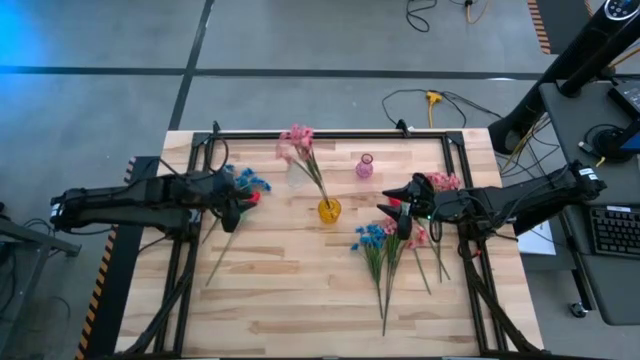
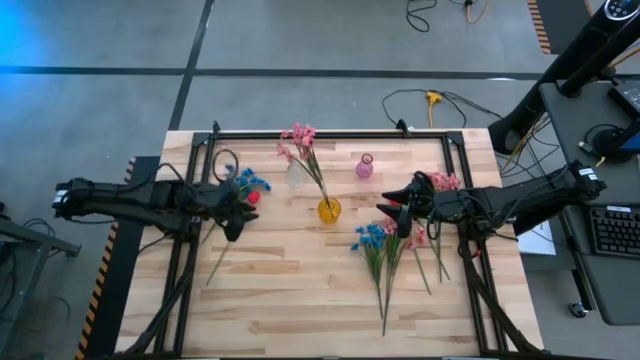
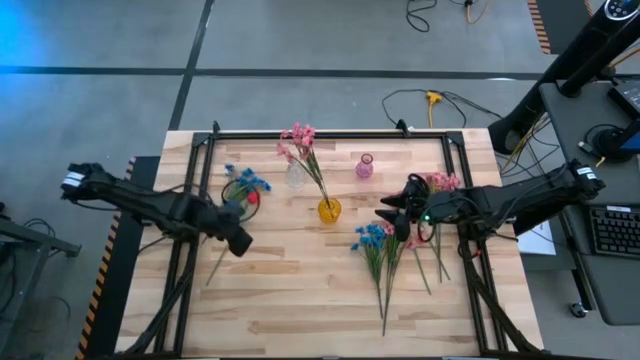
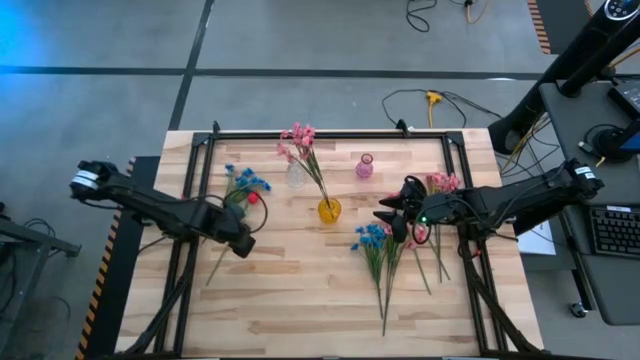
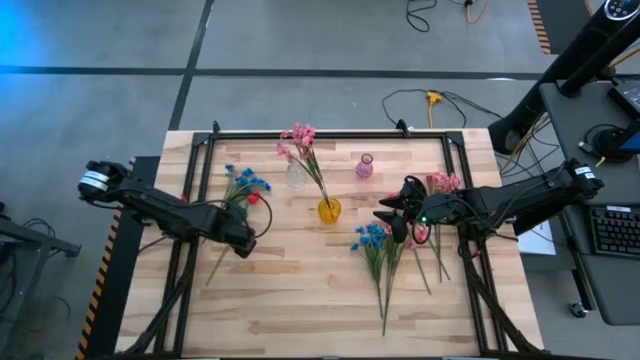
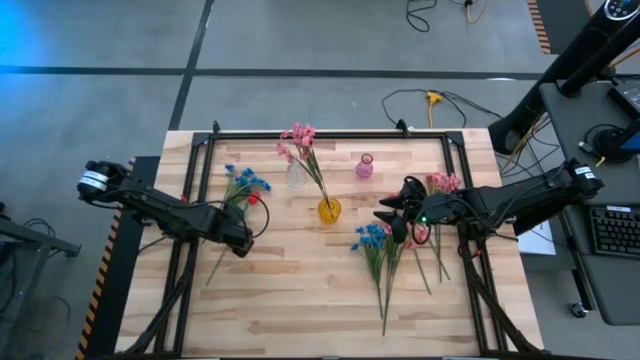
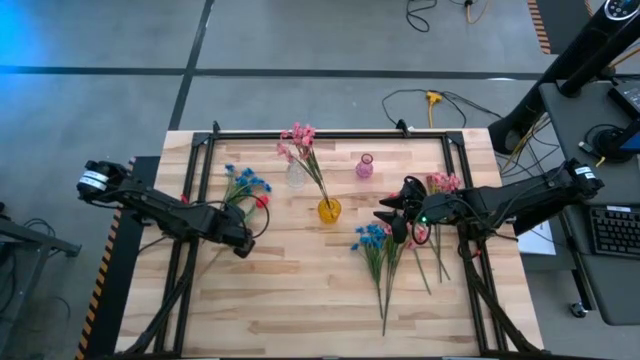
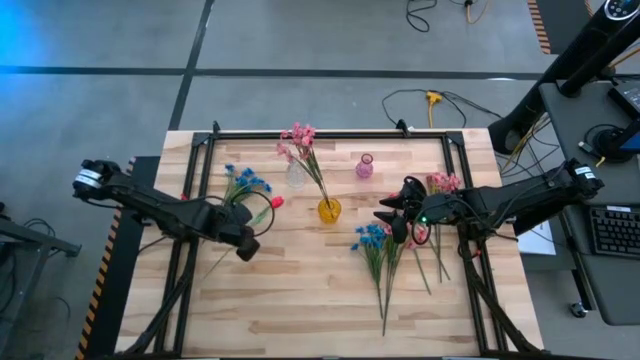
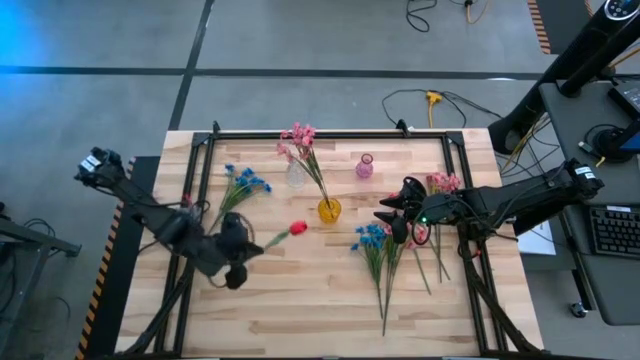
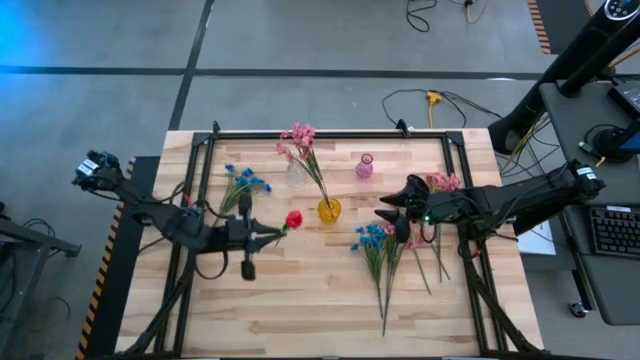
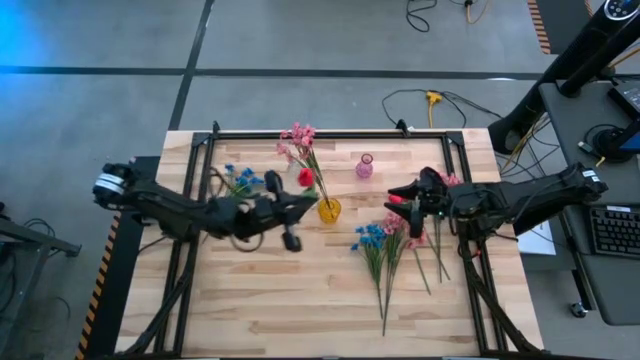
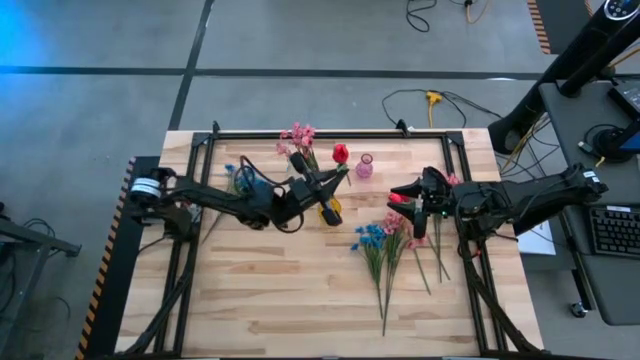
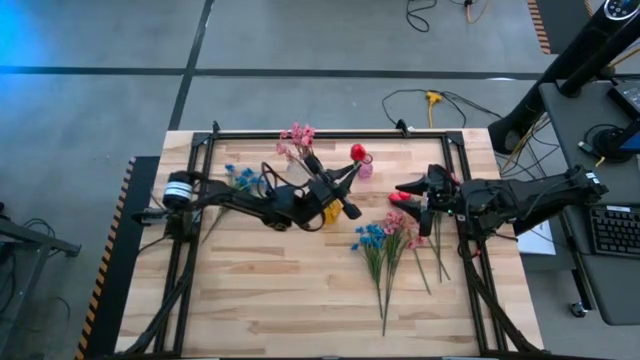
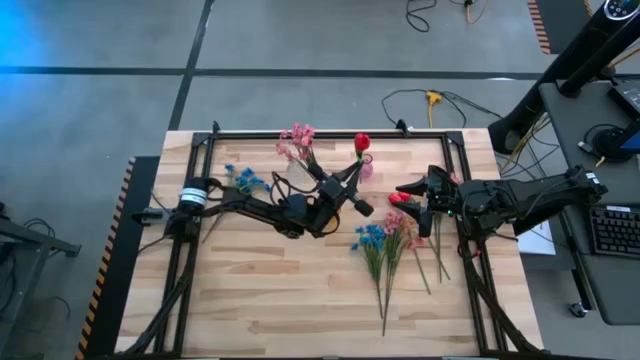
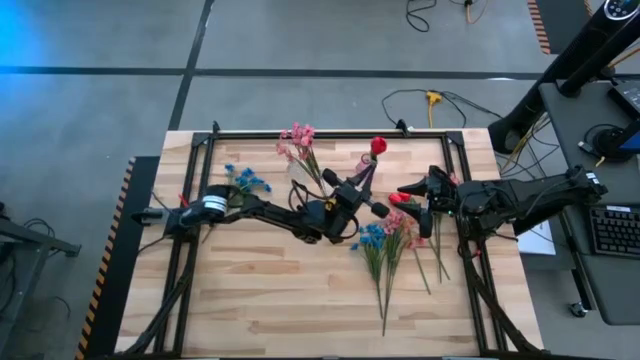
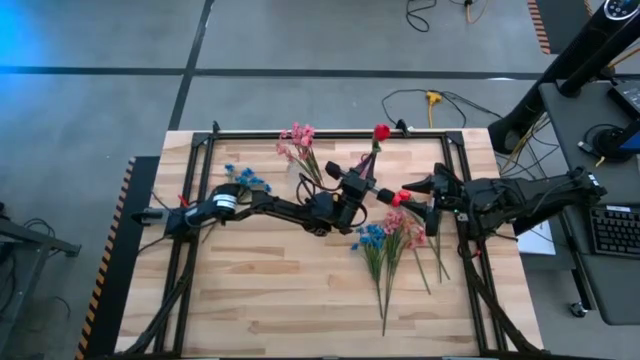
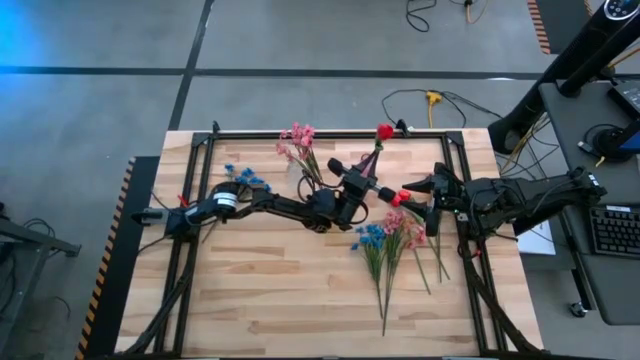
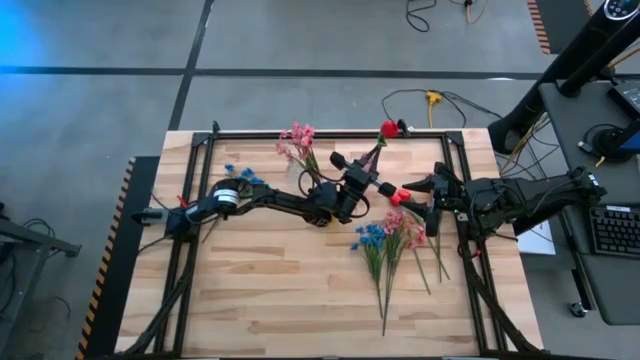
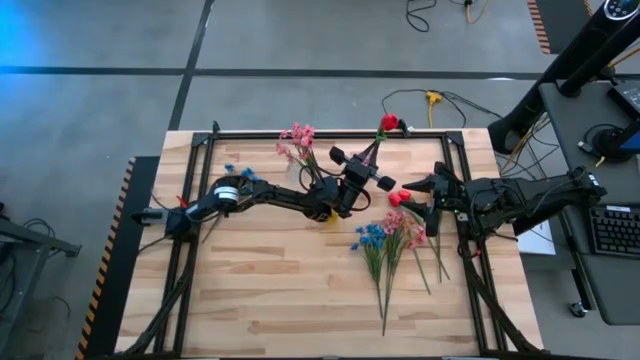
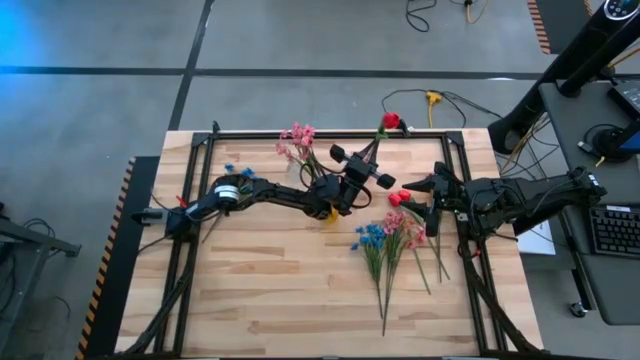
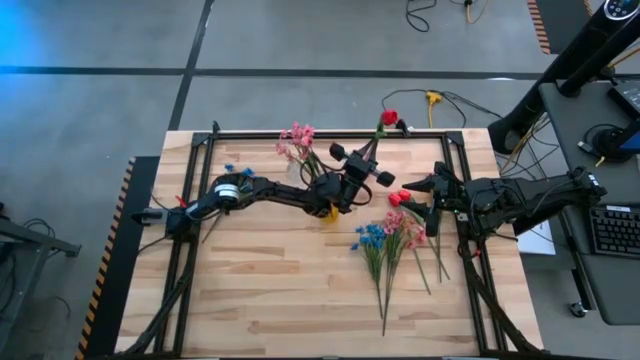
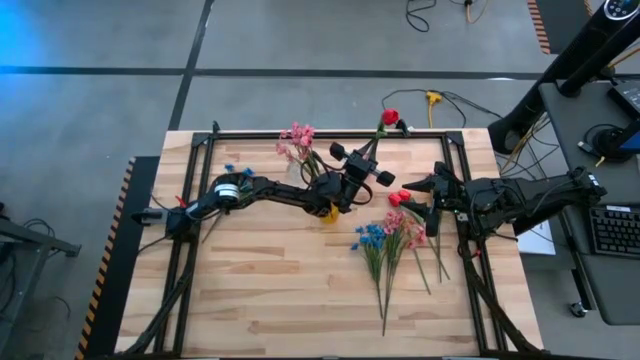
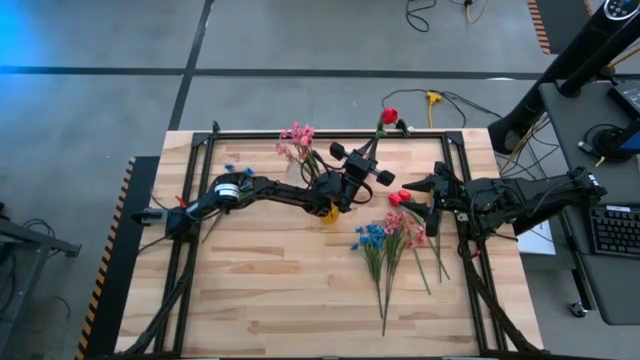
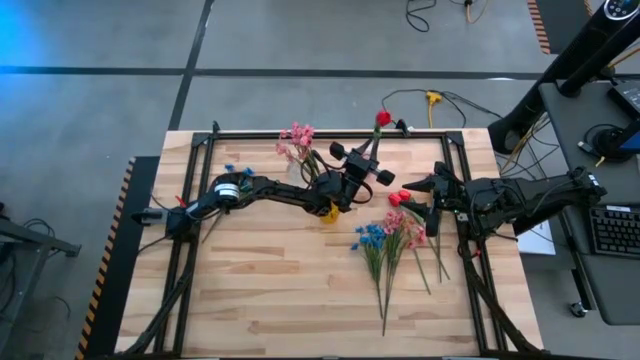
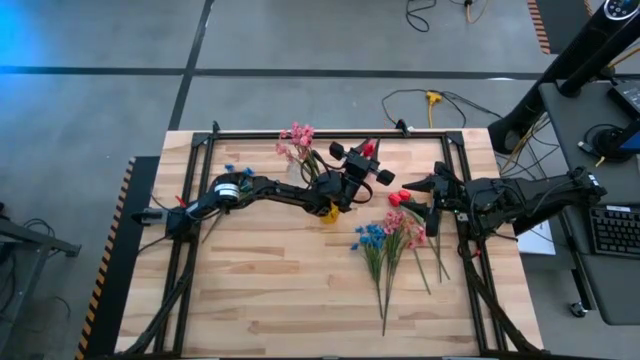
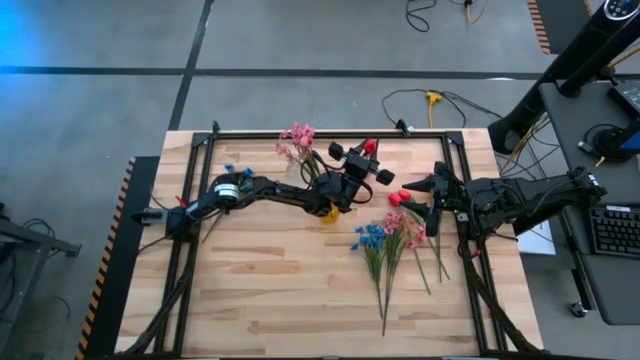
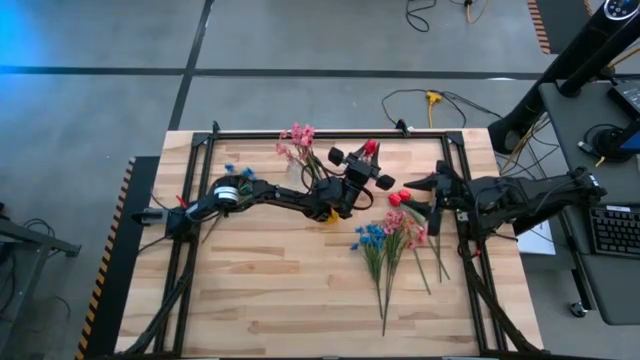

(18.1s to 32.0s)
Task: Sort flowers into vase by color
Put the left red tulip into the violet vase

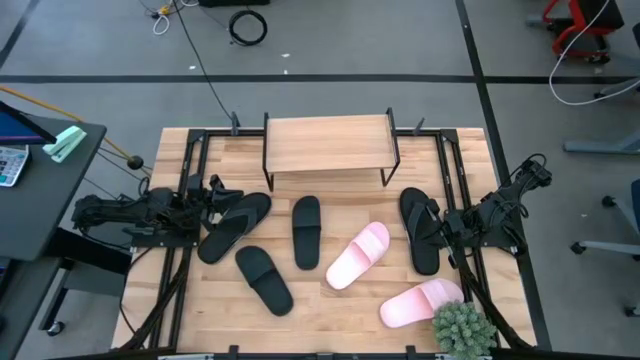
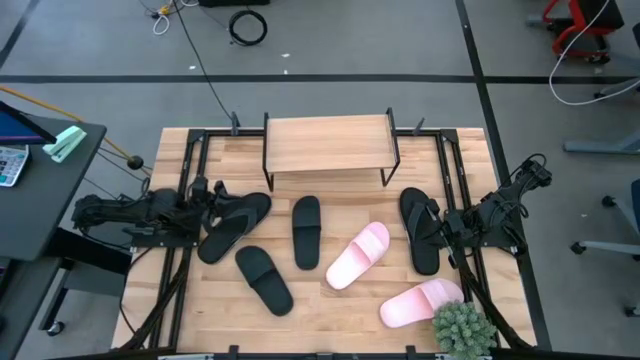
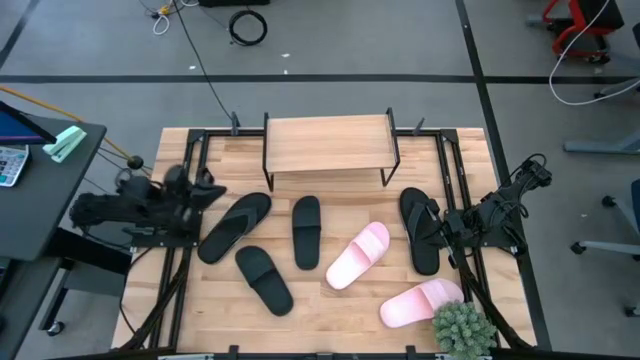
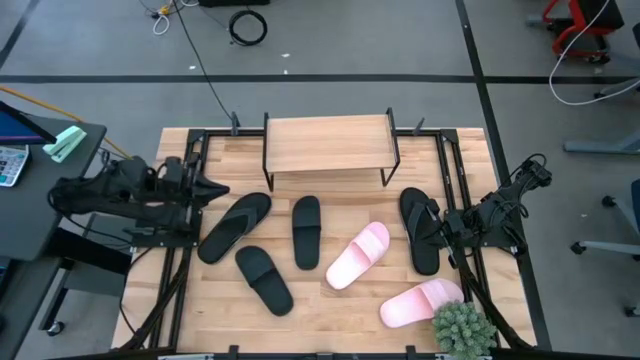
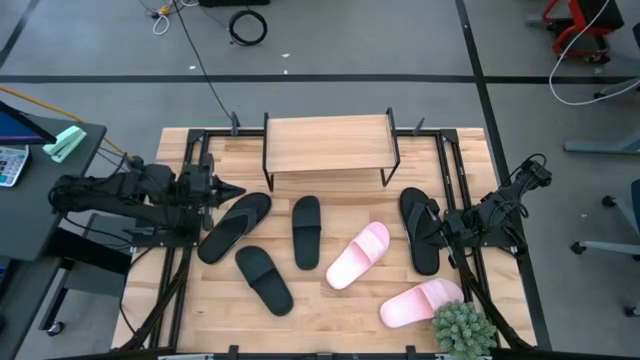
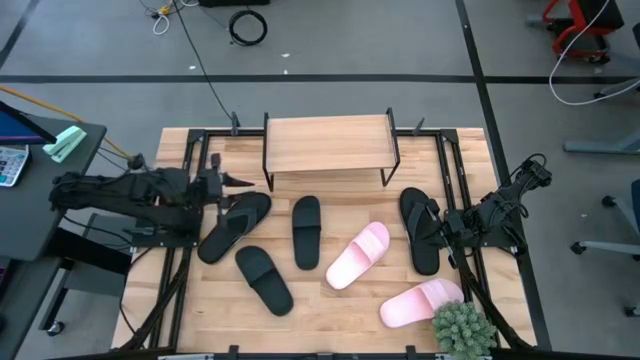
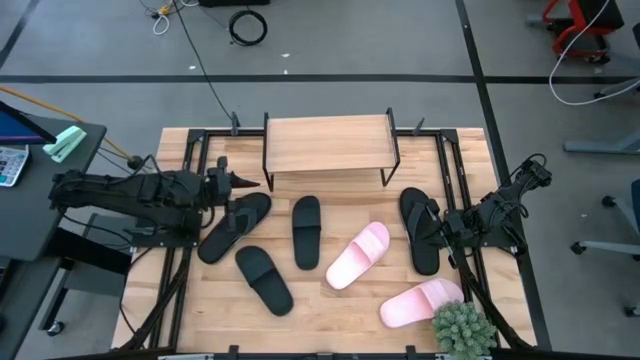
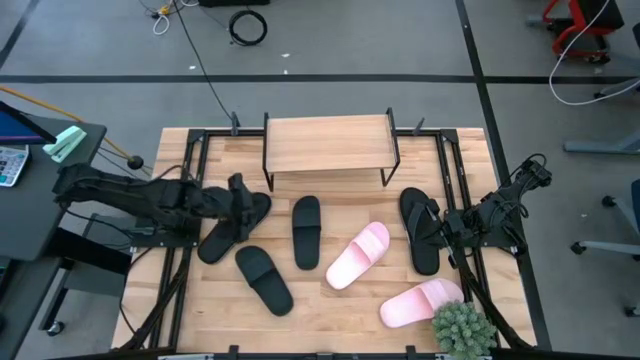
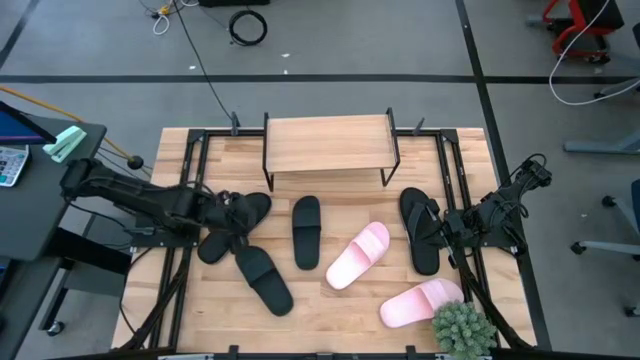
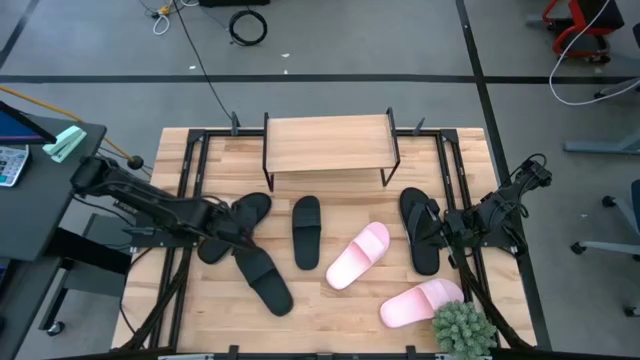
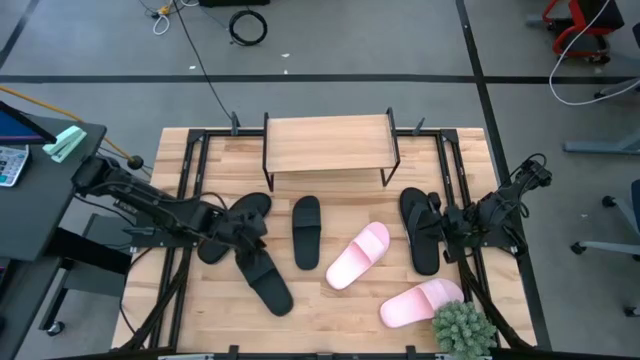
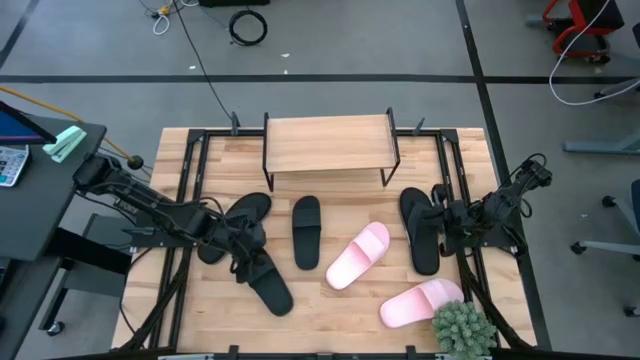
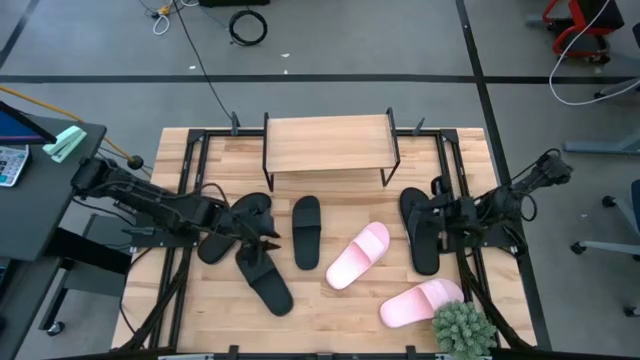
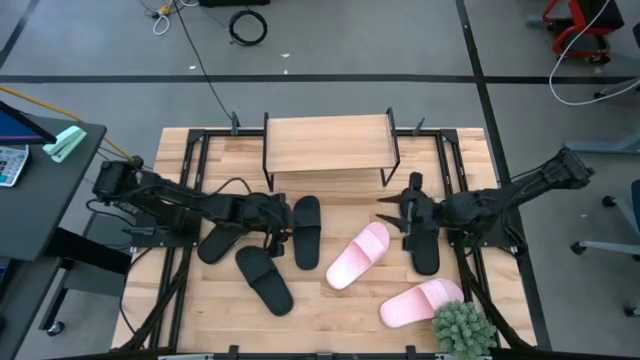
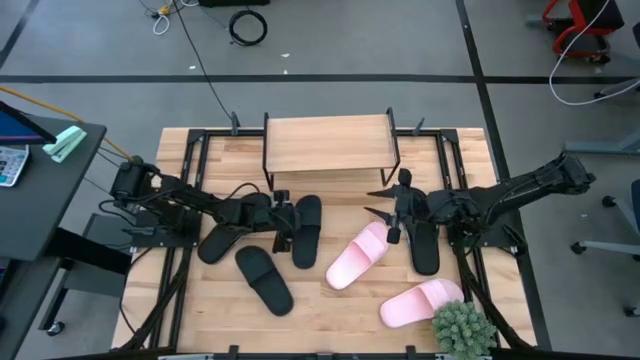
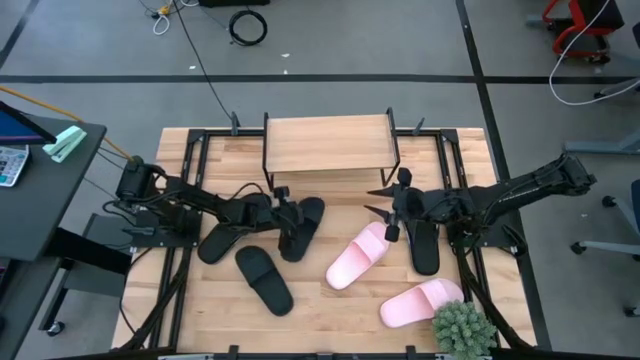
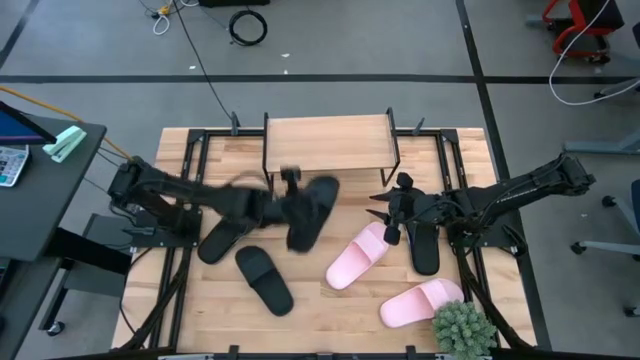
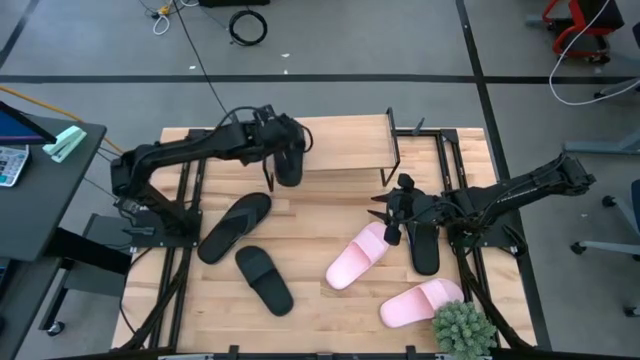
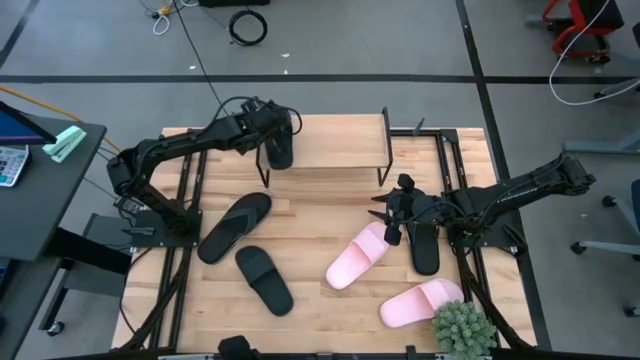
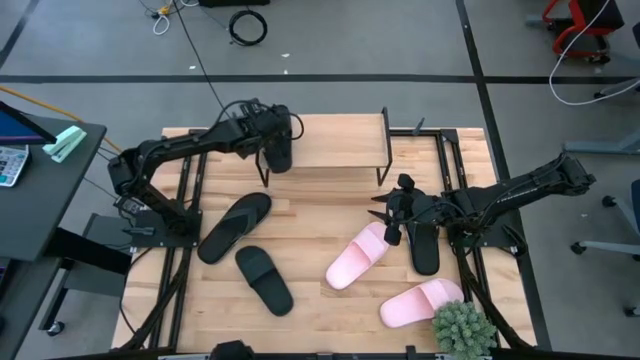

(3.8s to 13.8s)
Task: Pick and place slides into the shelf
Put the top black slider on the shelf
